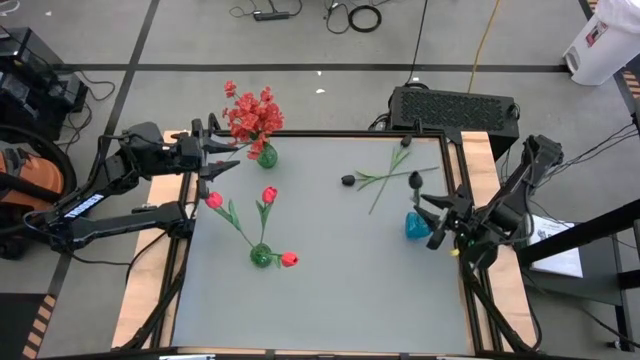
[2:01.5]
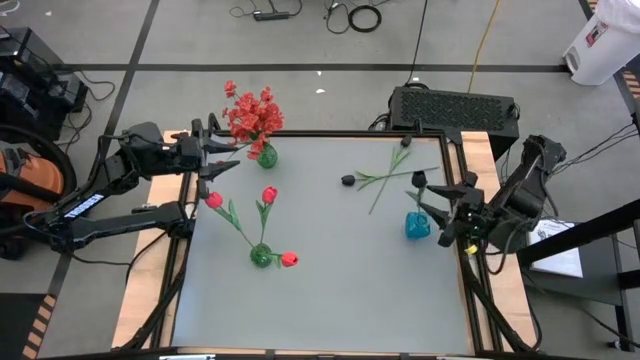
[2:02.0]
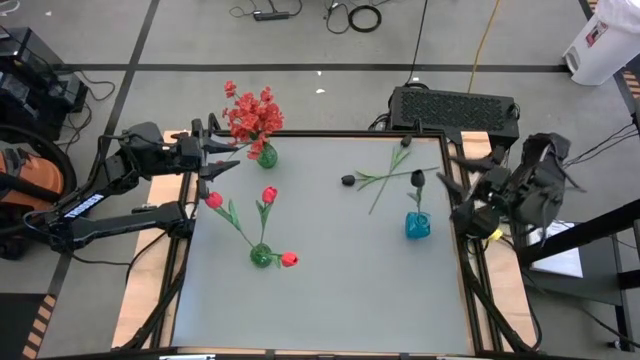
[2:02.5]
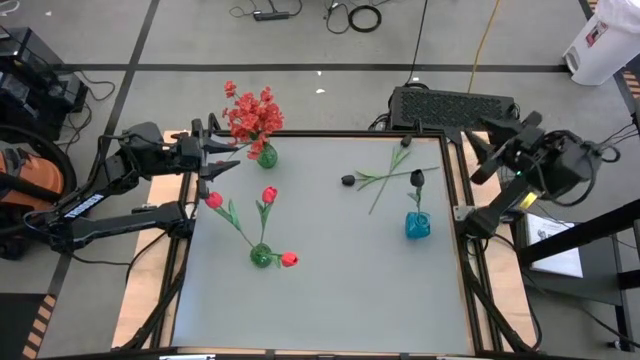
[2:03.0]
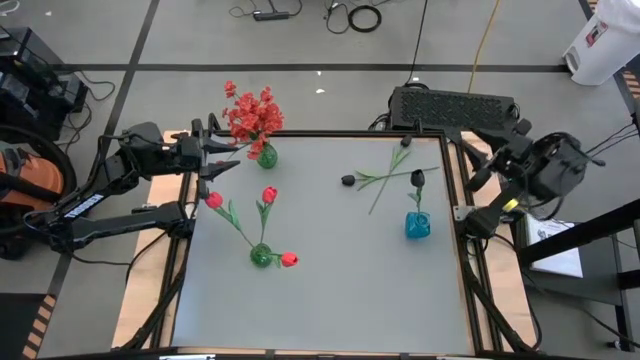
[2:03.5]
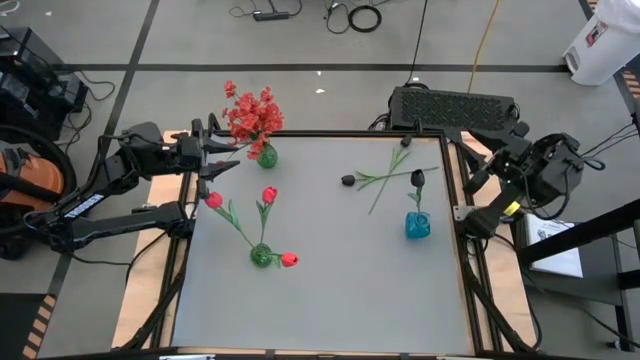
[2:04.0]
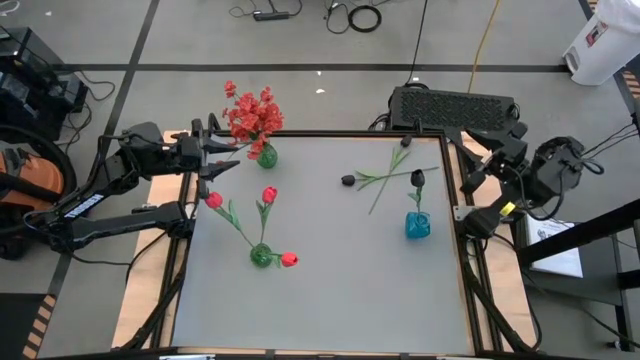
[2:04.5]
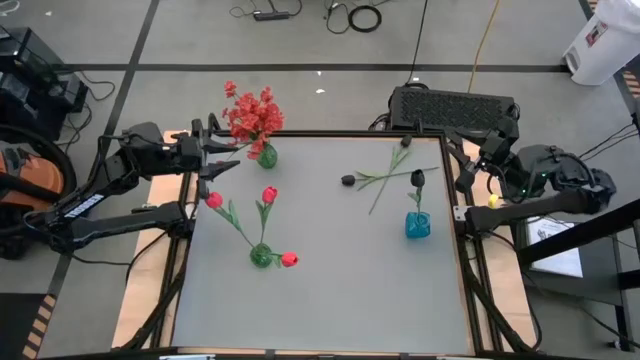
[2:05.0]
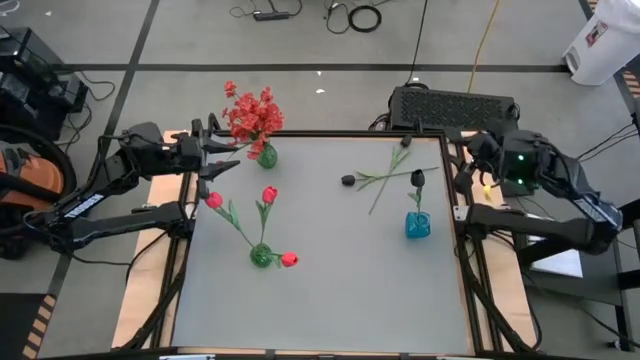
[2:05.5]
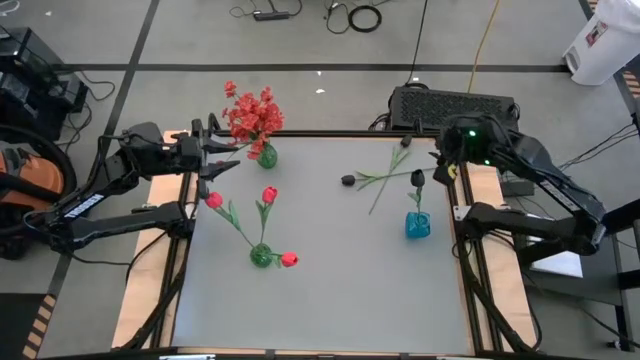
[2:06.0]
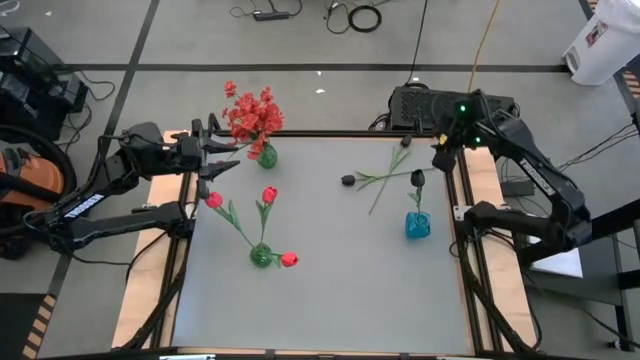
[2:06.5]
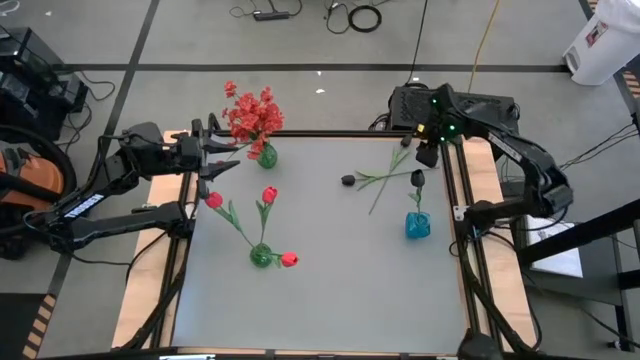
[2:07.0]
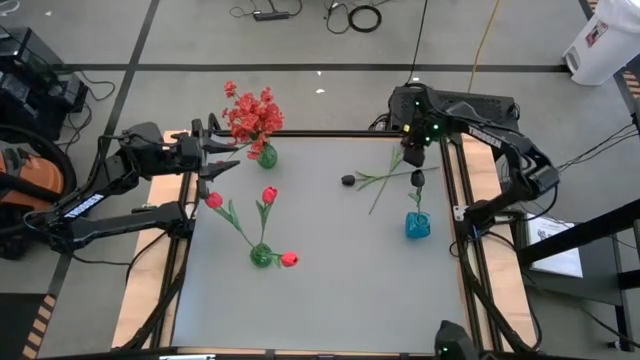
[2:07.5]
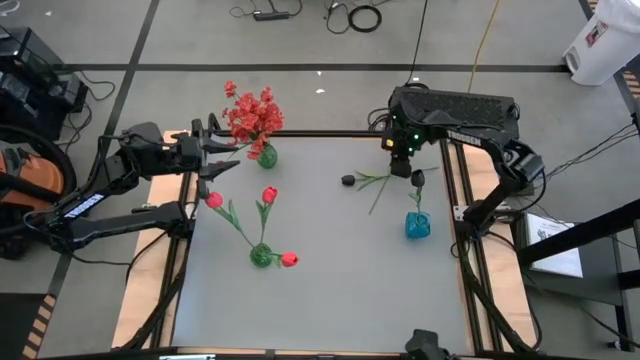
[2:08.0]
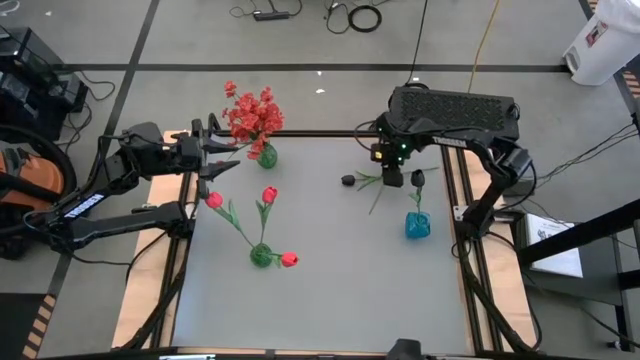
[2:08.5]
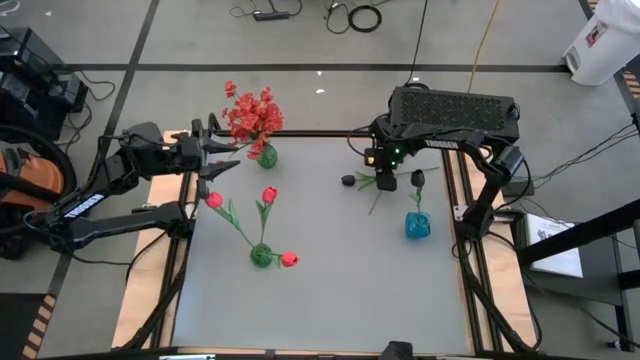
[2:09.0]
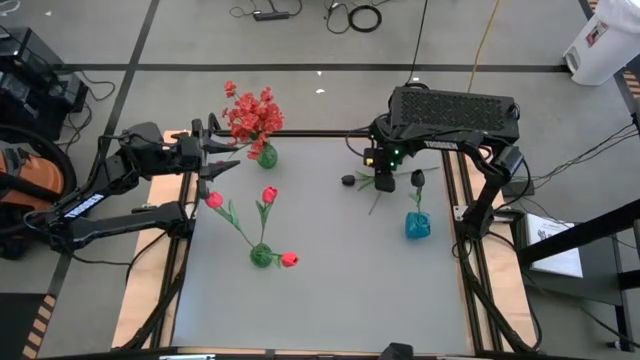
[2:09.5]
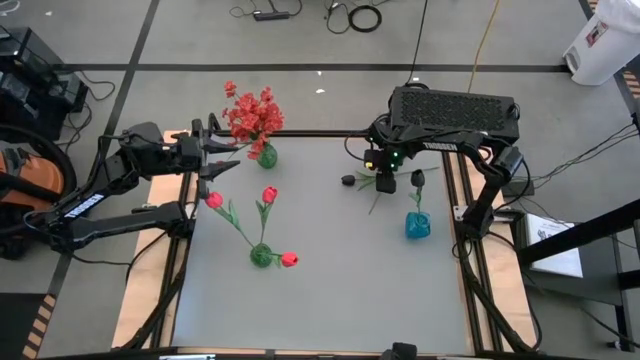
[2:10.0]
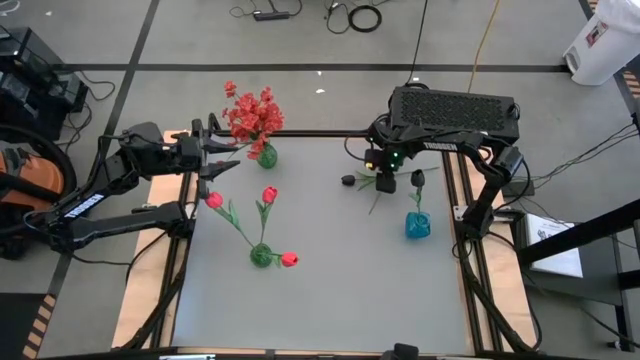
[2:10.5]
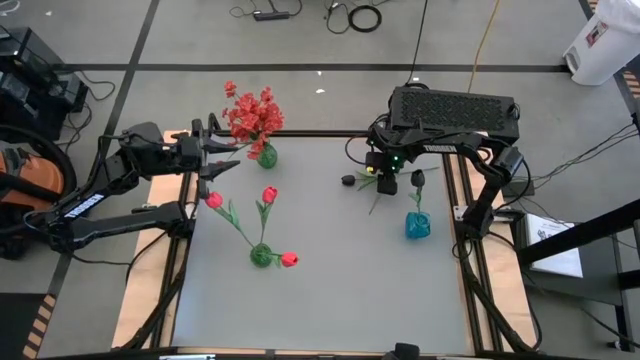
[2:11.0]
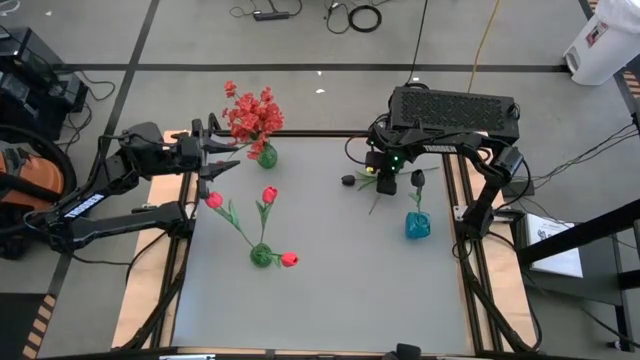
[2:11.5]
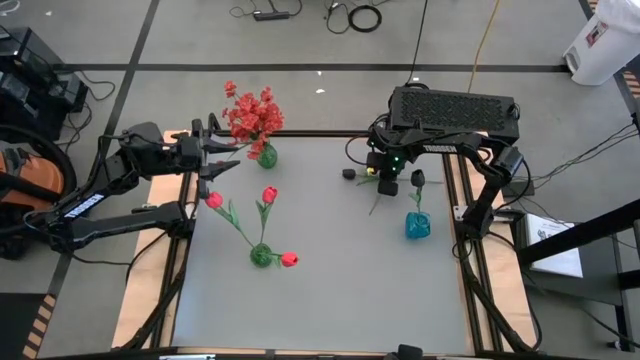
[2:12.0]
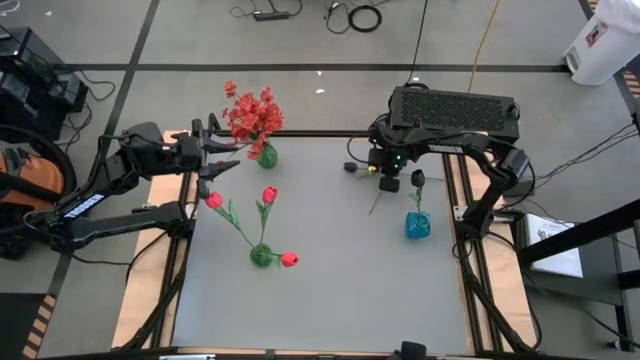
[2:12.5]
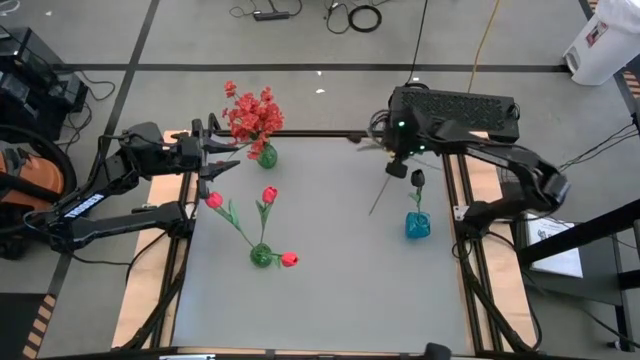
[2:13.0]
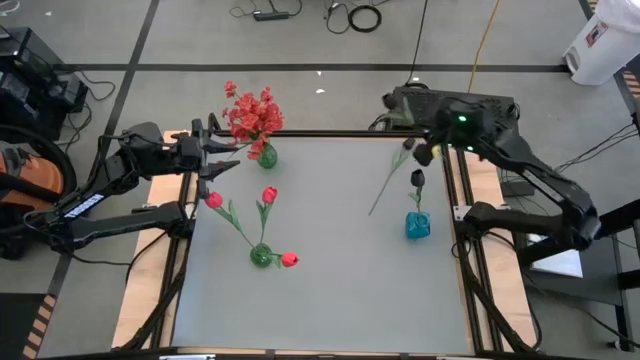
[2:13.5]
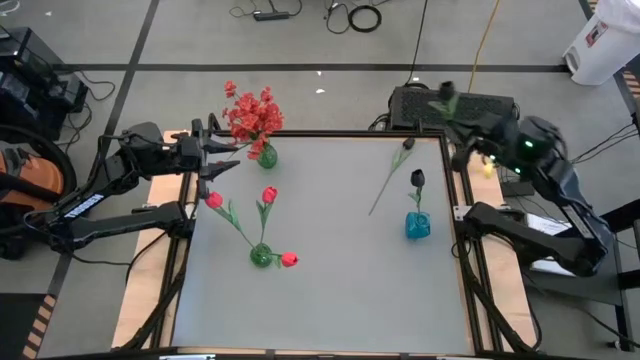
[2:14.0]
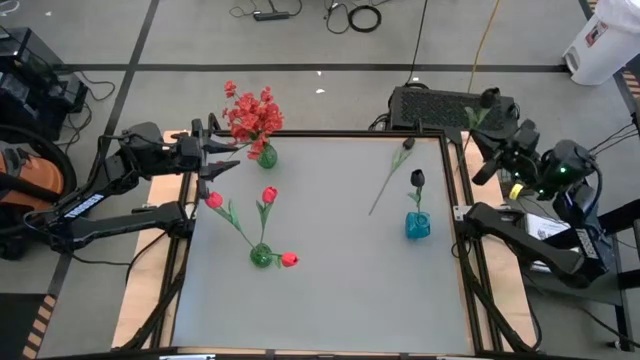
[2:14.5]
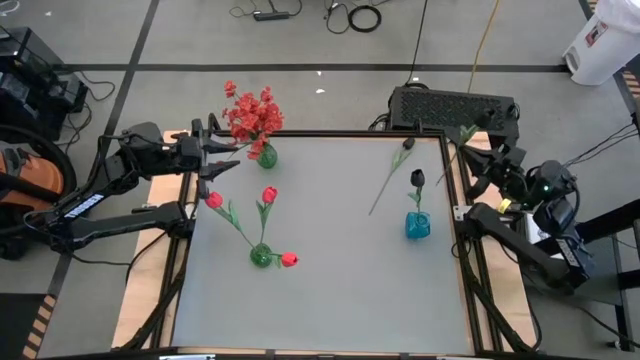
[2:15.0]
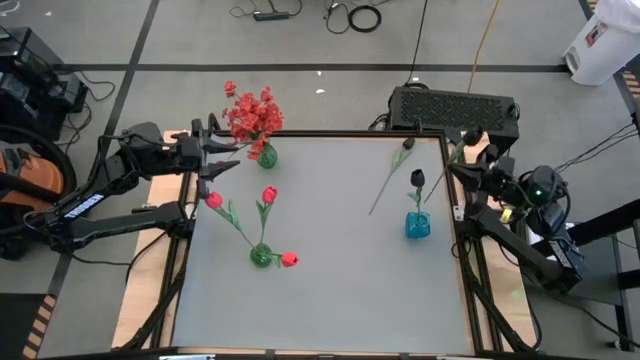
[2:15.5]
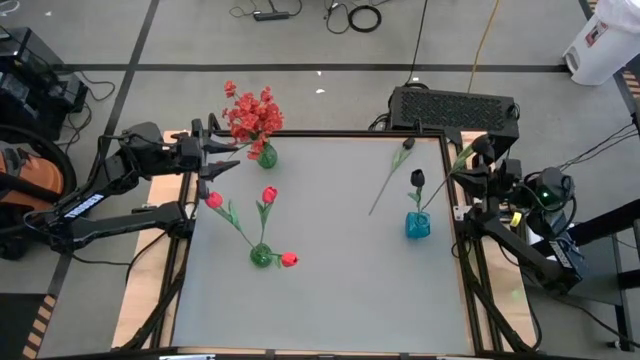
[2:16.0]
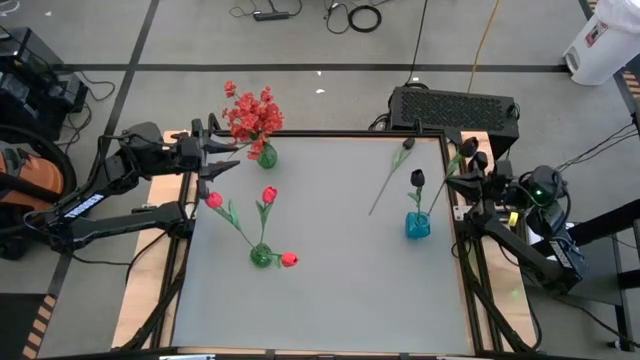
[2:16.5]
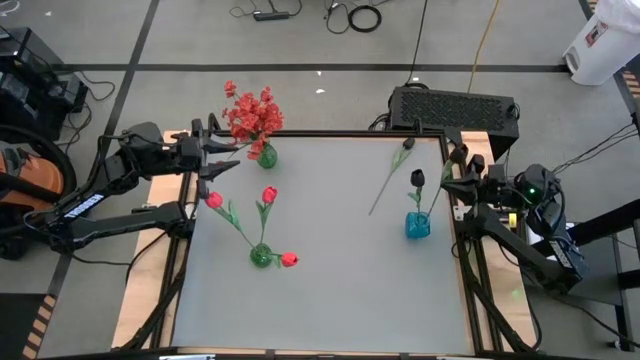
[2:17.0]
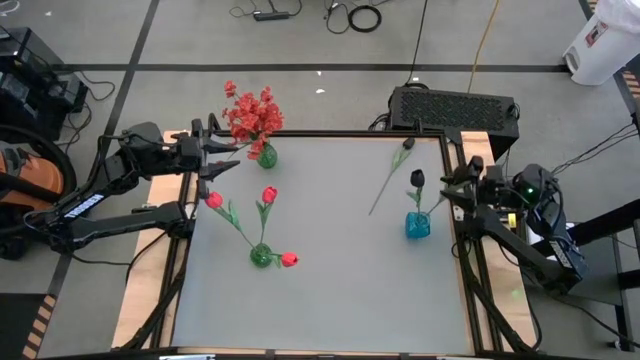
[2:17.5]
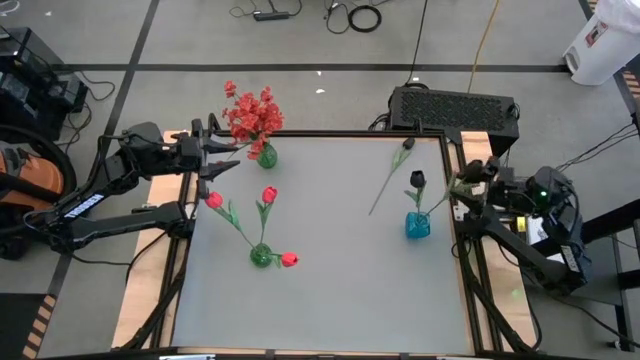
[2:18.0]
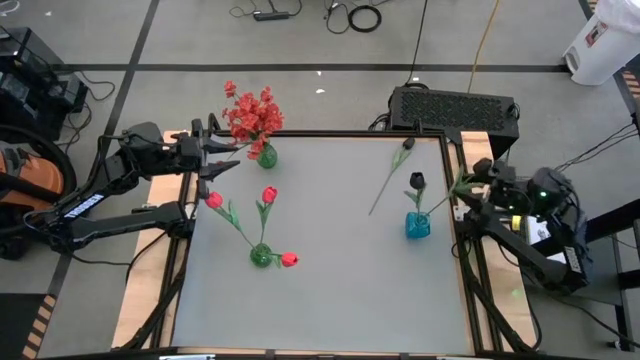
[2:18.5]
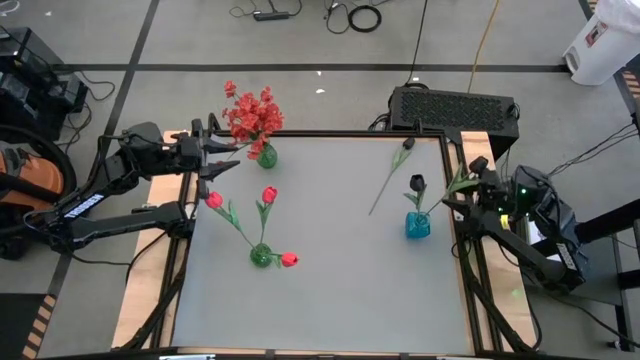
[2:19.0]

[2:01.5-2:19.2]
Task: Sort flowers into vase by color
Put the top black flower into the blue vase

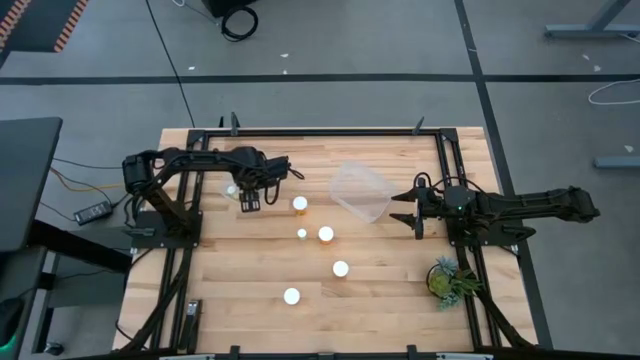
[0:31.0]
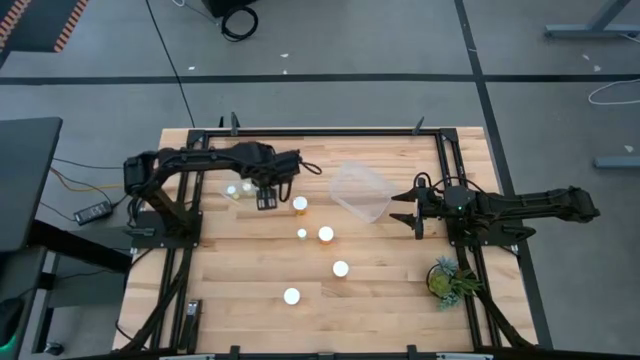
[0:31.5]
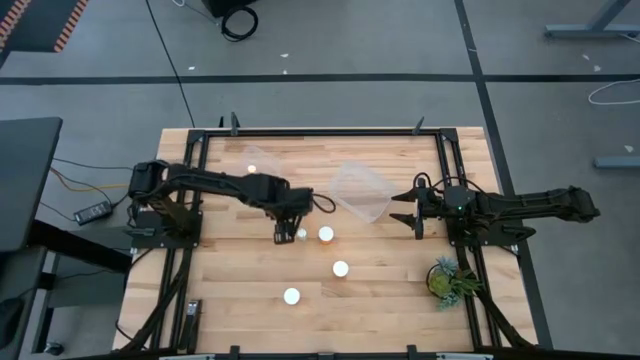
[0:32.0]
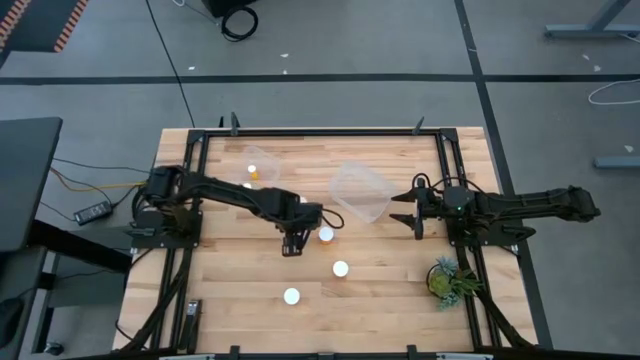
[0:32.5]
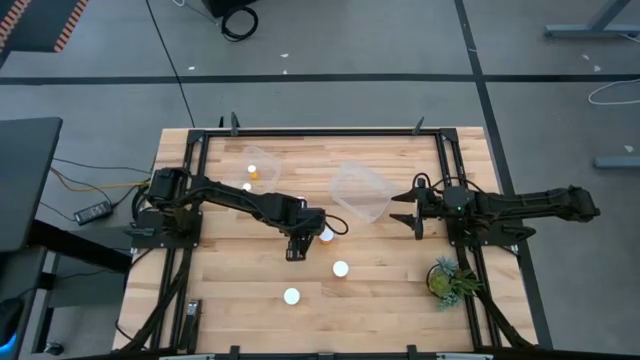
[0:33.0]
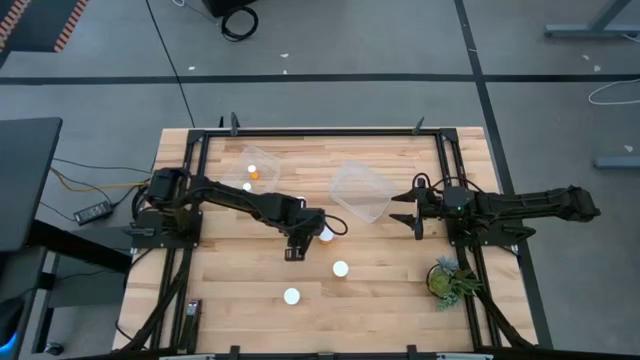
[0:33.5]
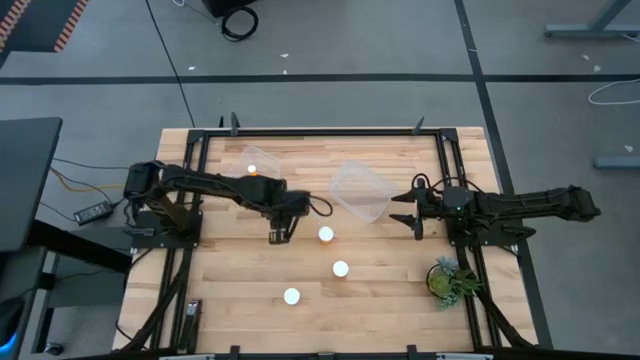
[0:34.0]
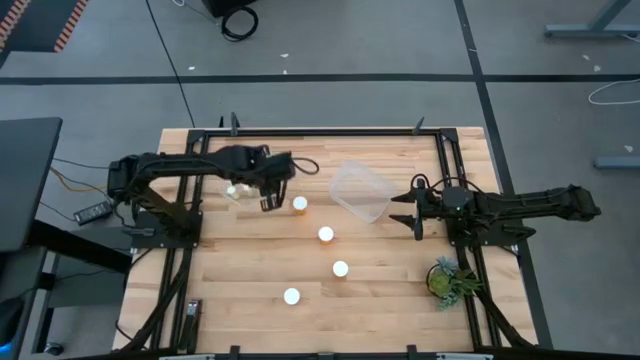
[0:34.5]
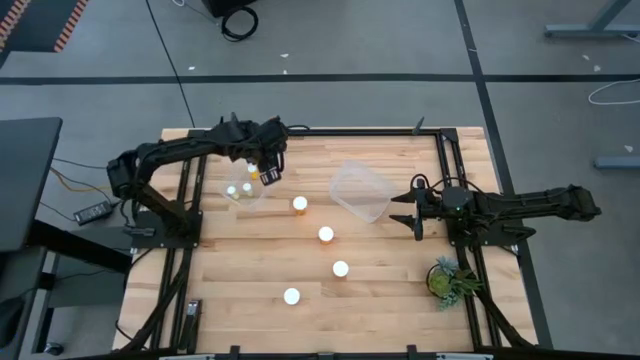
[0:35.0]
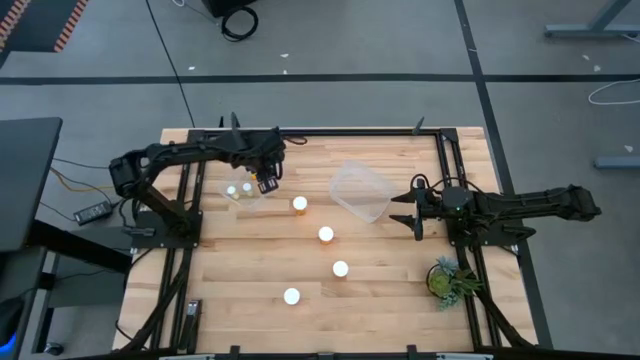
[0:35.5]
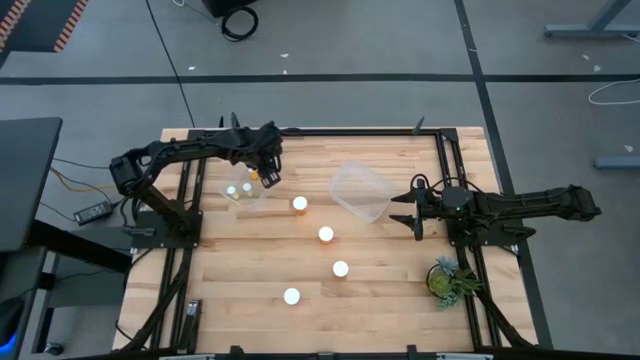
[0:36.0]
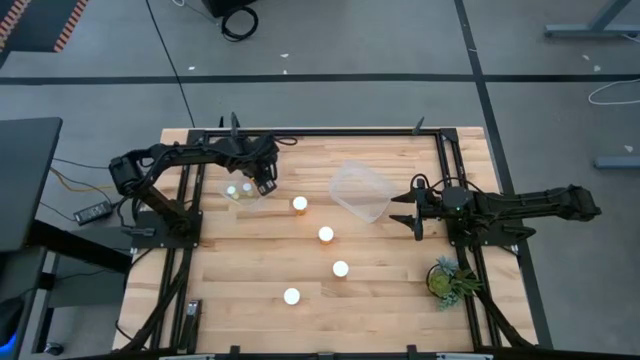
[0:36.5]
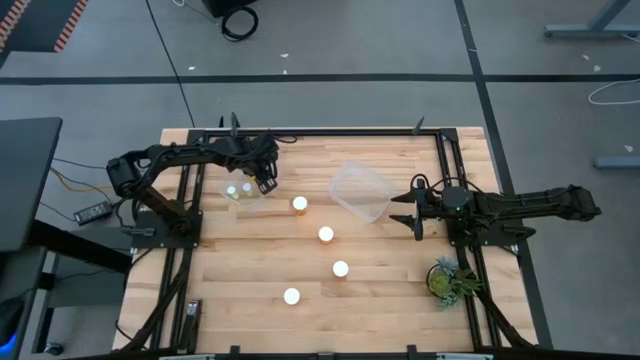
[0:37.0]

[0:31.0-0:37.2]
Task: Pick and place medicine bottles into bin by pill shape (circle, oval)
Put the small yellow pill bottle into the left transparent bin
